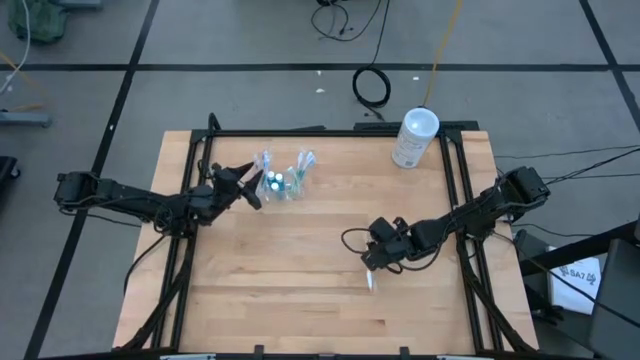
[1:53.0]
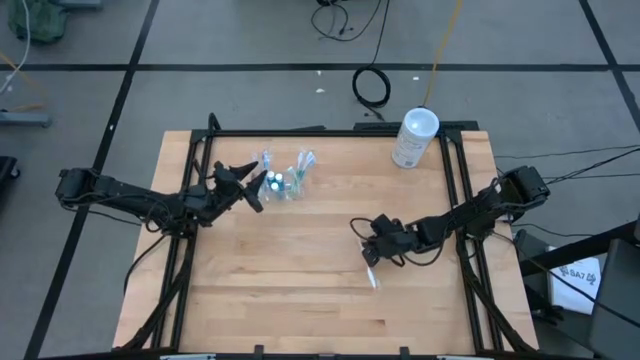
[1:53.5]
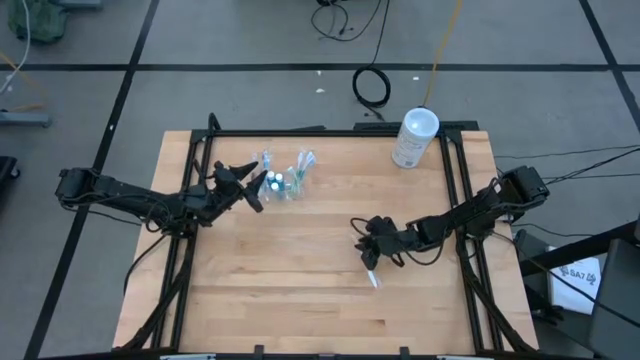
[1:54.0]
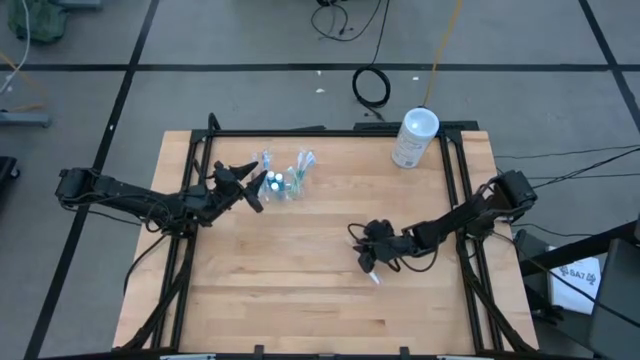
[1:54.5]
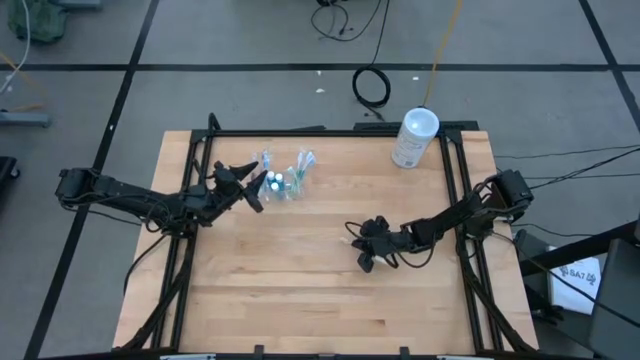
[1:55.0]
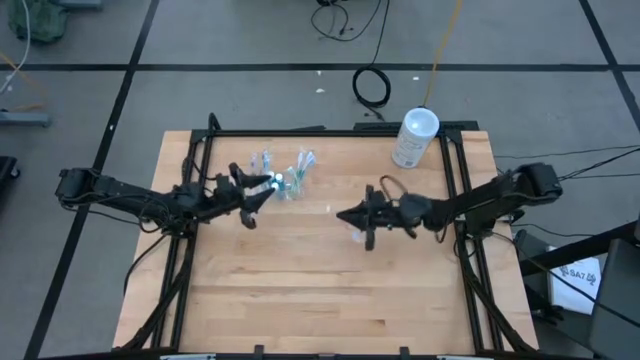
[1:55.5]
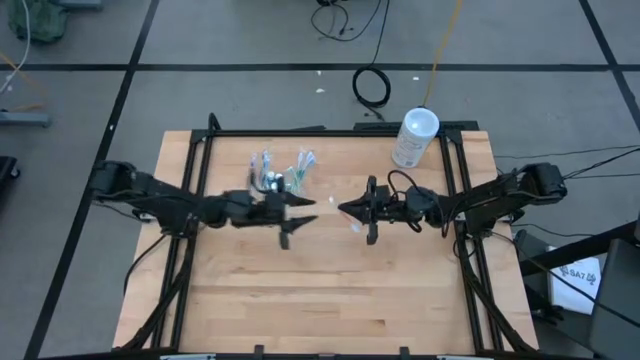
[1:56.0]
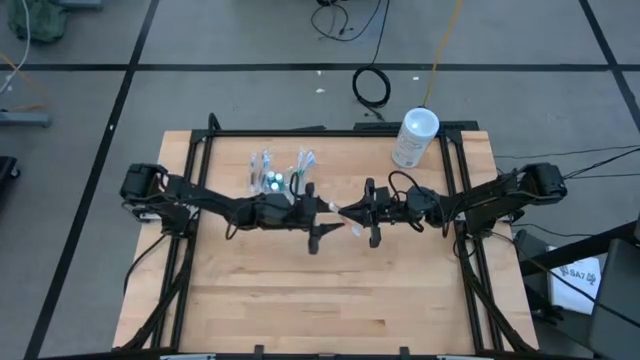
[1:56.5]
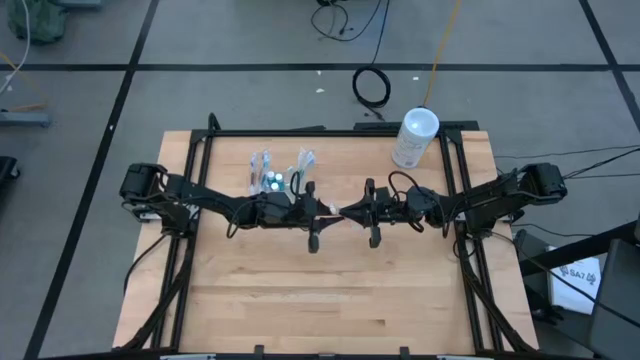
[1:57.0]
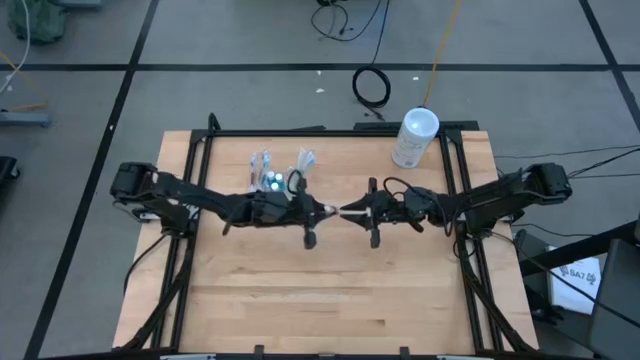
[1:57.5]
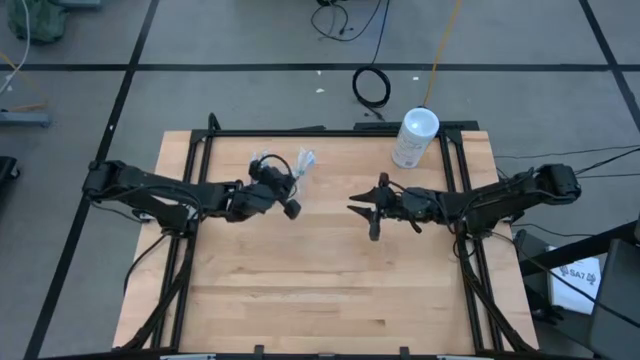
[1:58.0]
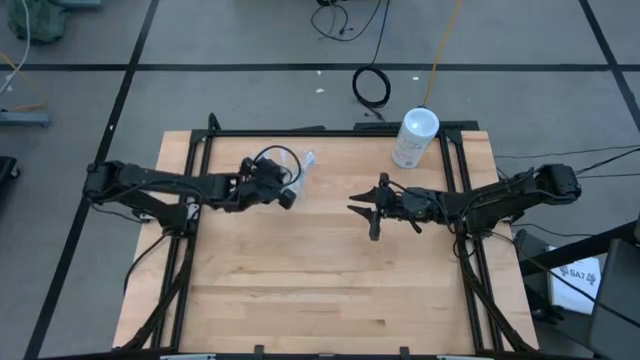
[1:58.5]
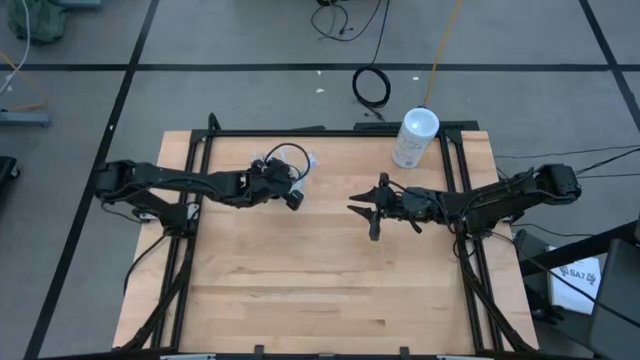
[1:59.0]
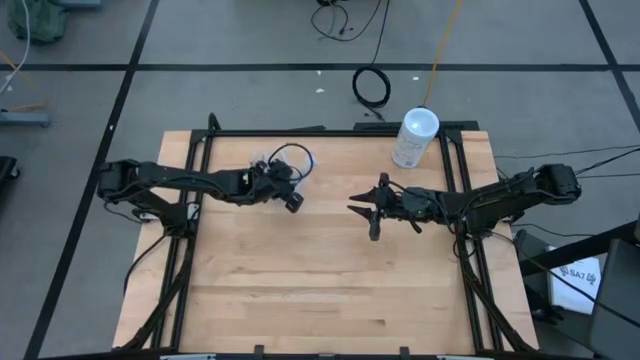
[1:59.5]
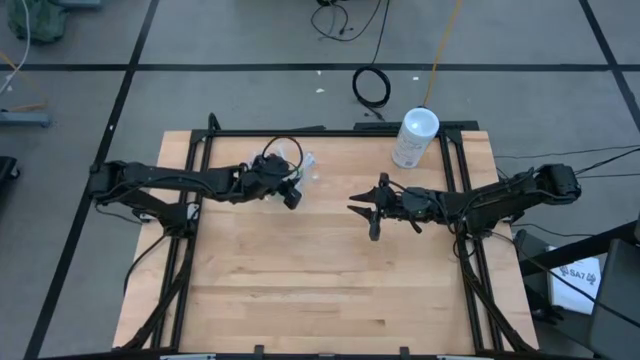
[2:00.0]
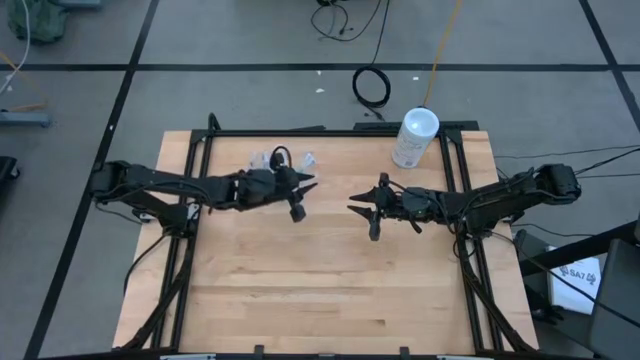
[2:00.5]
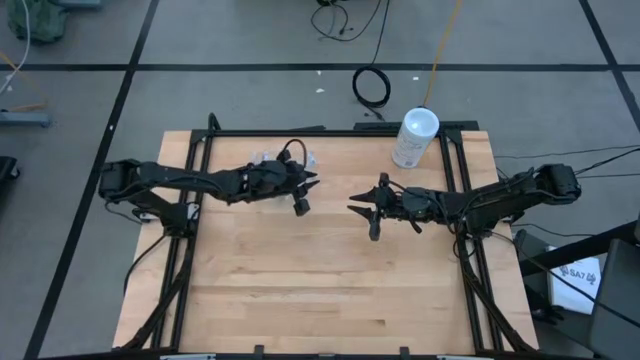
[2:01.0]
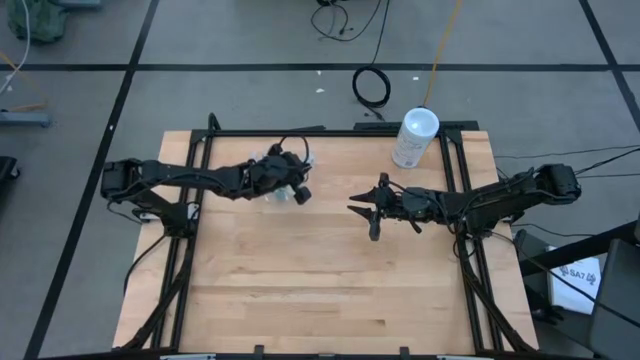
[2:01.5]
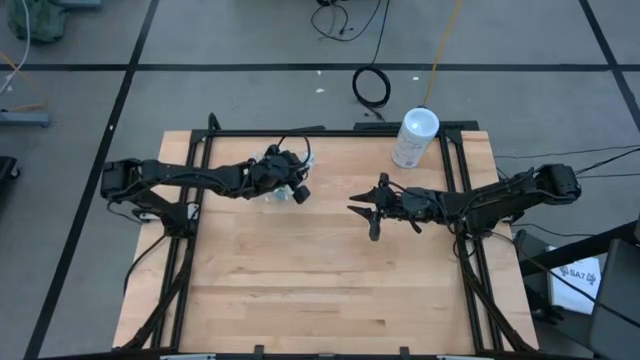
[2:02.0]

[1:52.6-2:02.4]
Task: Pick & Place toothbrushing station
Put the orange toothbrush into the right compartment of the transparent organizer

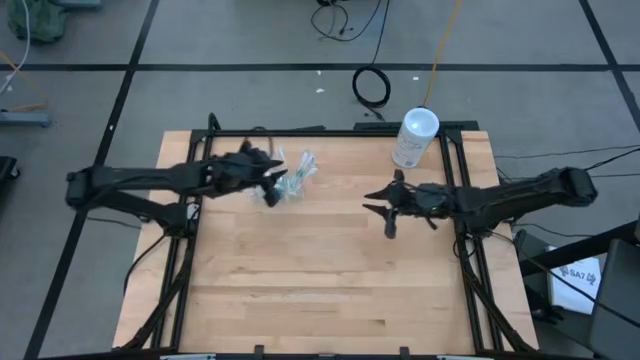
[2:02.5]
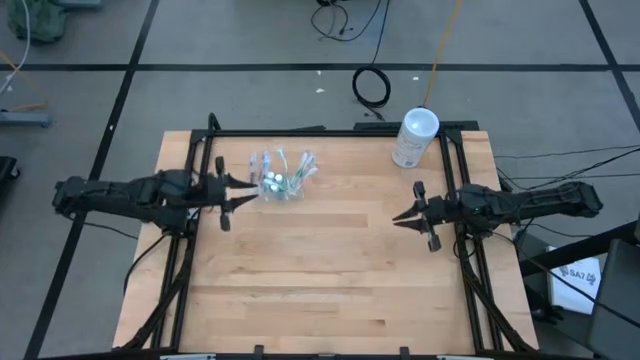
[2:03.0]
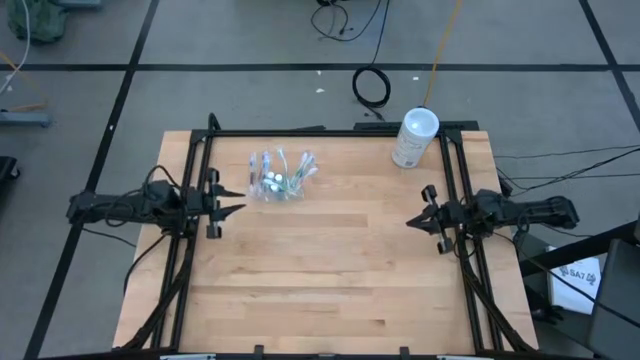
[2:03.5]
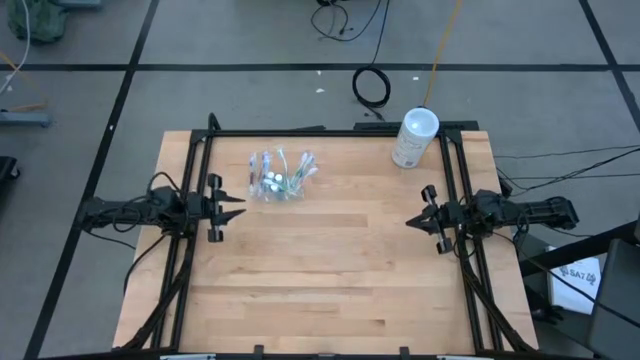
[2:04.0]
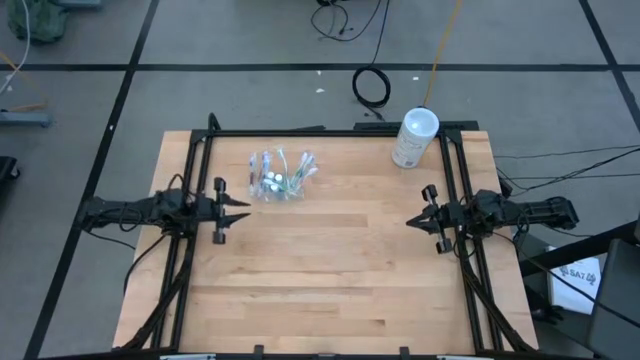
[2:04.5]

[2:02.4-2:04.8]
Return to Home Position

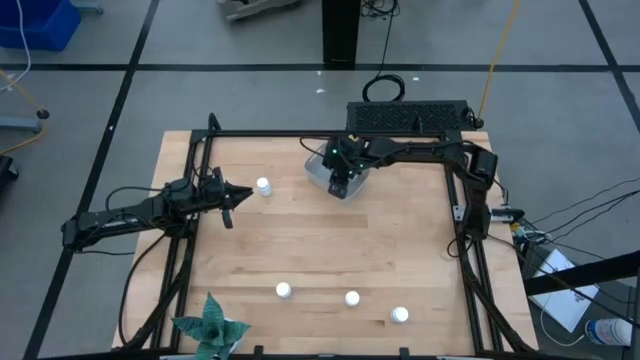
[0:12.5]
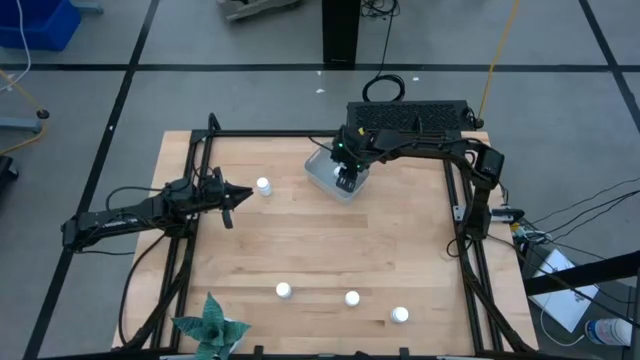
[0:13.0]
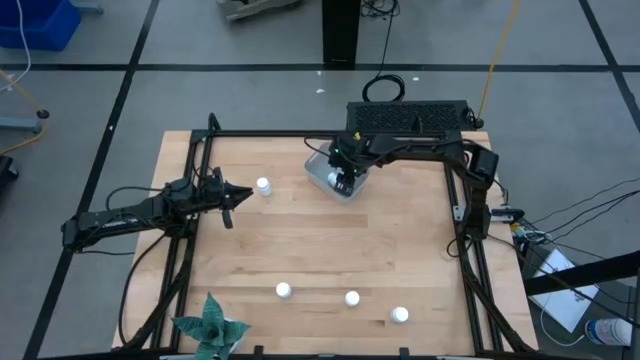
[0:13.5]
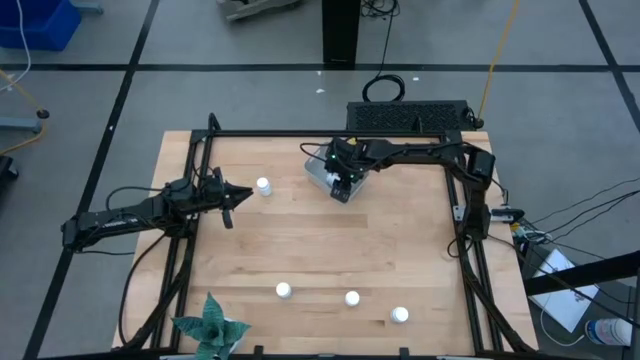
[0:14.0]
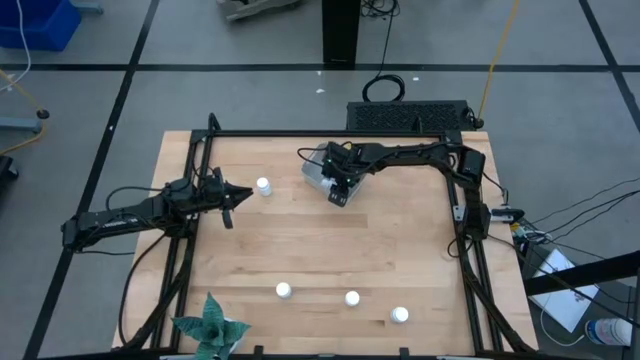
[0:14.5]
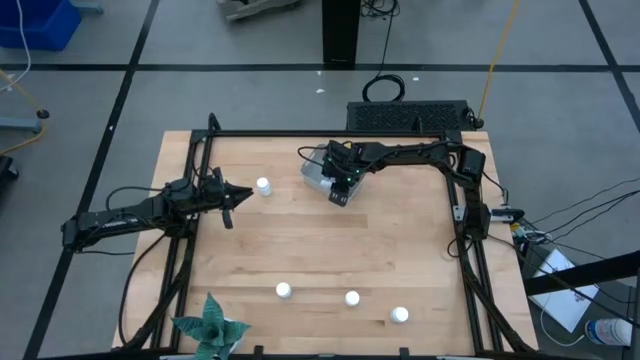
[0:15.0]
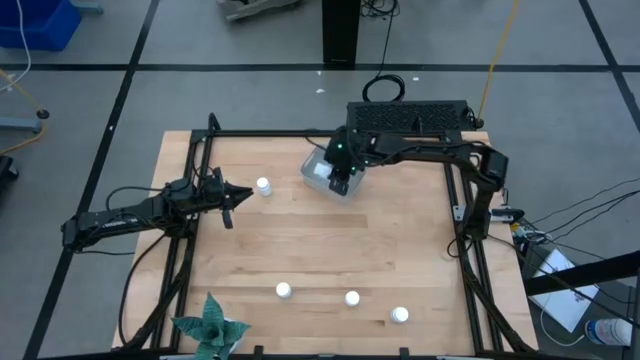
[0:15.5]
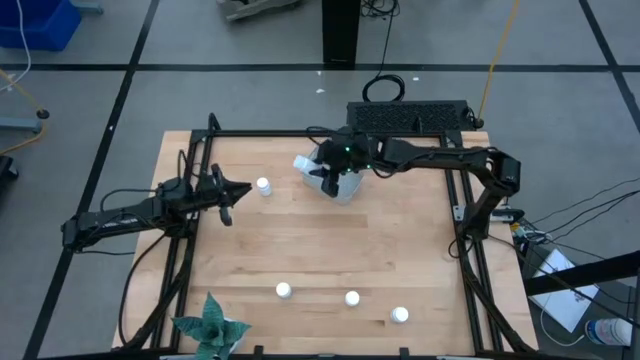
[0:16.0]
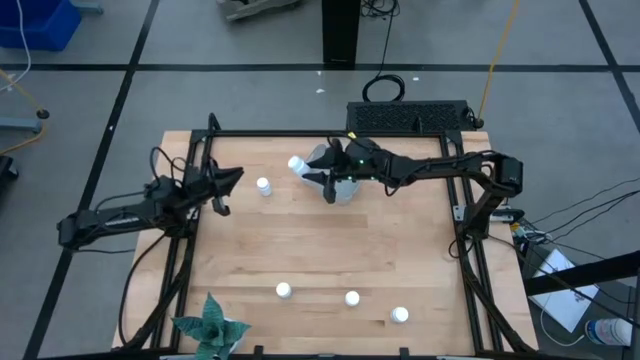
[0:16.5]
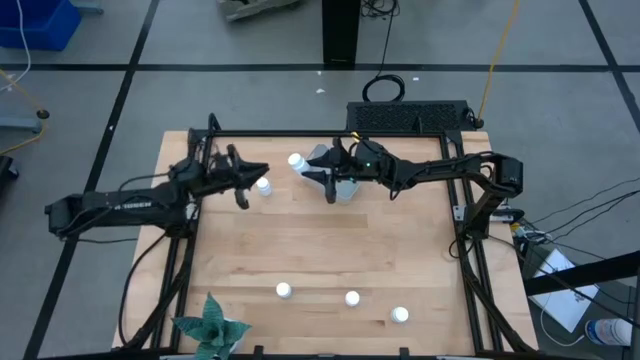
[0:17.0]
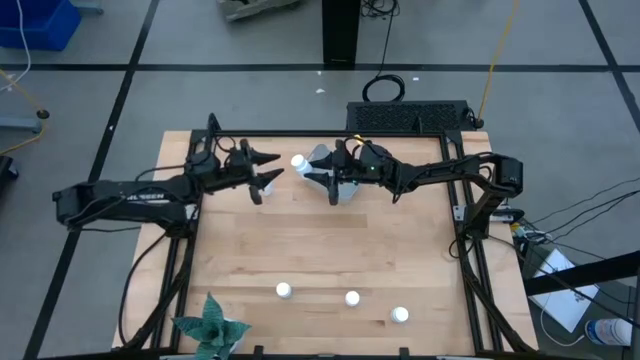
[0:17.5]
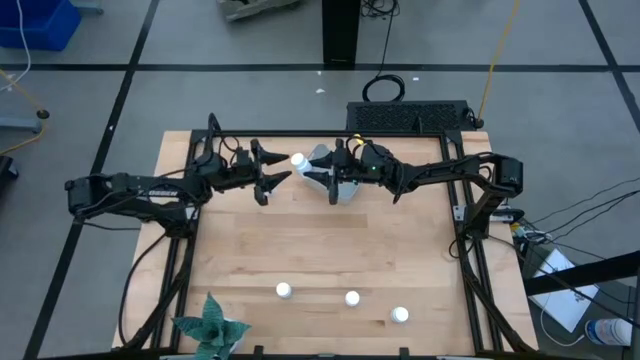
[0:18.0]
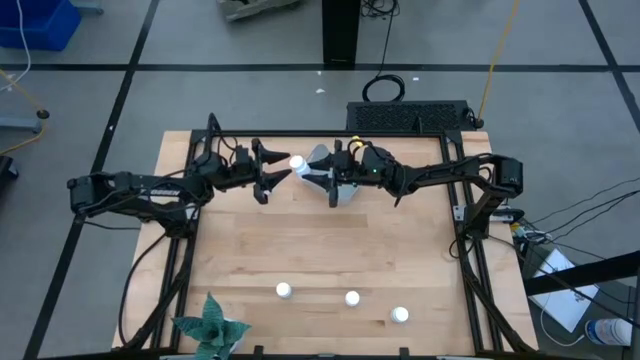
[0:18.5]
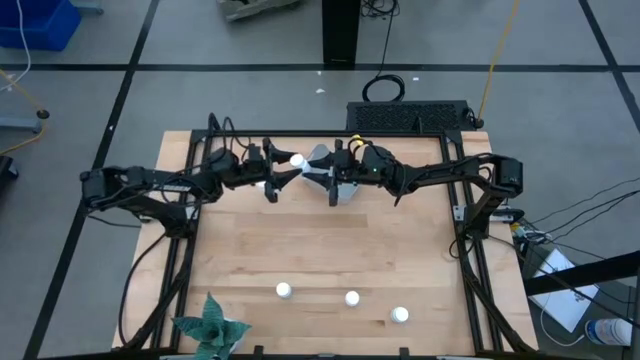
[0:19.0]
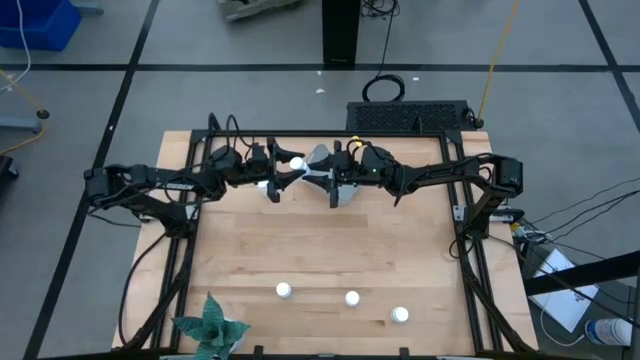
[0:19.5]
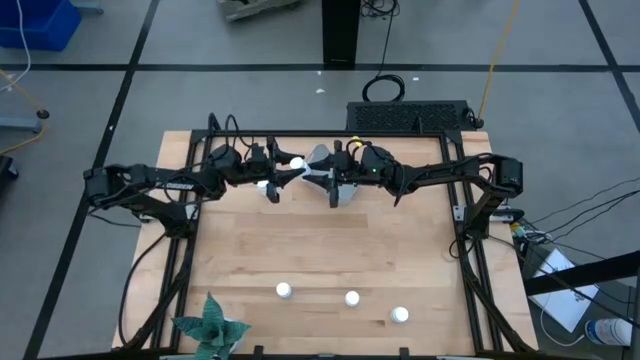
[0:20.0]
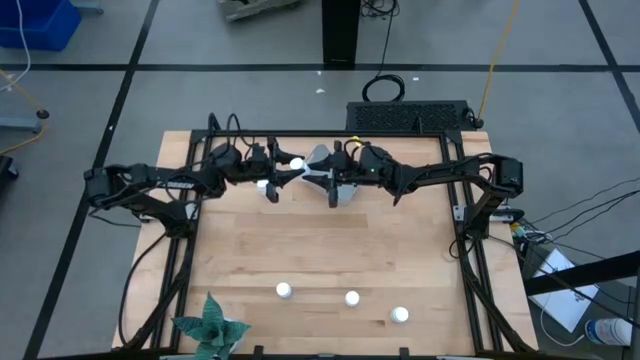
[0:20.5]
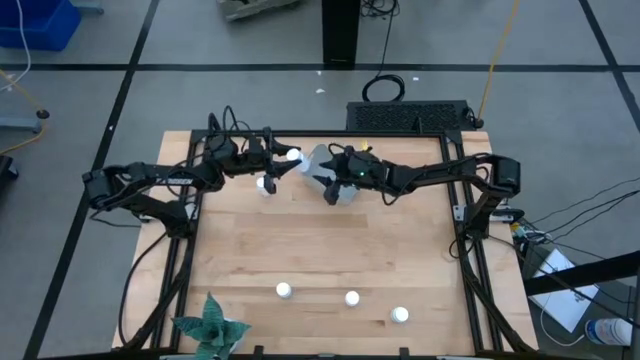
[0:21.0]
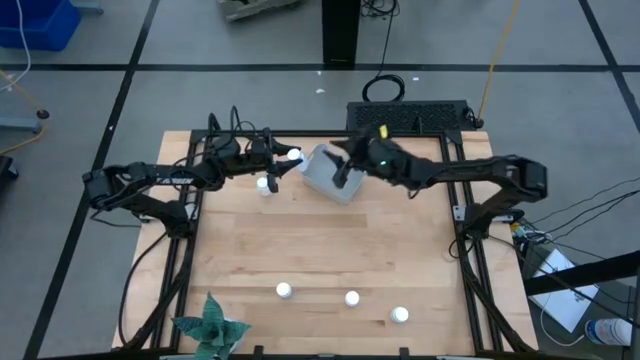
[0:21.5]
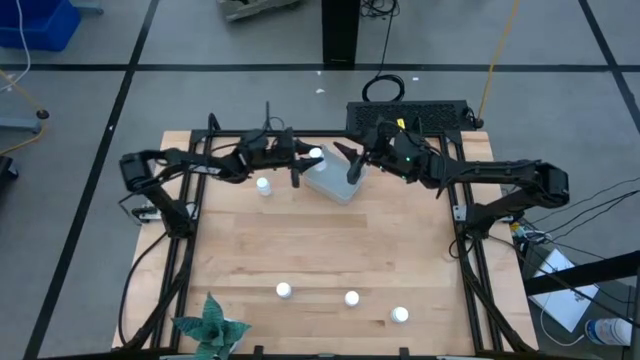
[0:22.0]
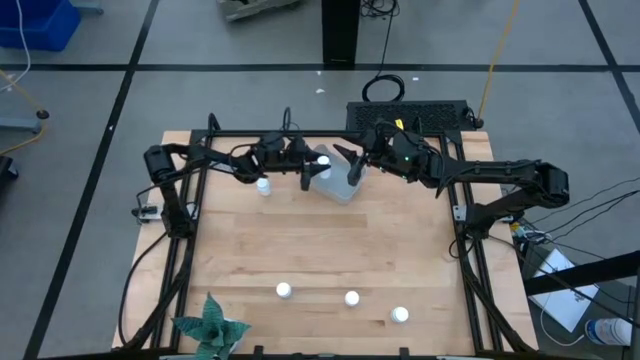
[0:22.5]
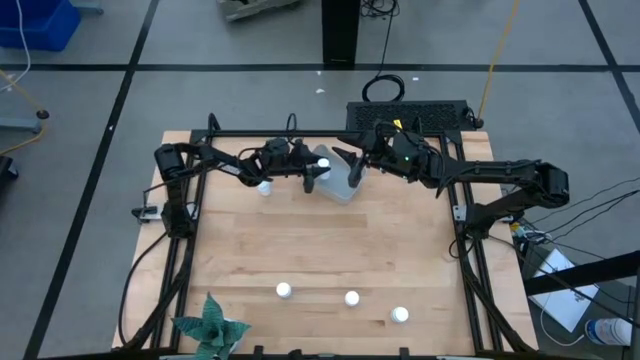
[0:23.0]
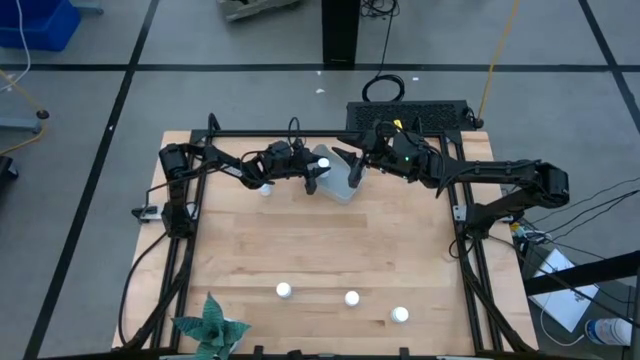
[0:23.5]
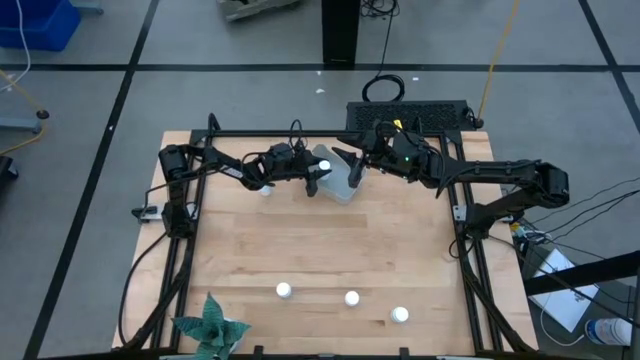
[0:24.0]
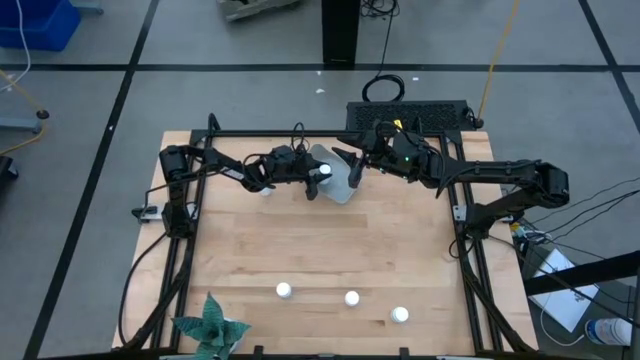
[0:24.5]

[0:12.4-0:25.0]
Task: Pick and place pill bottles into a basket
Put the white pill bottle into the gray bin
